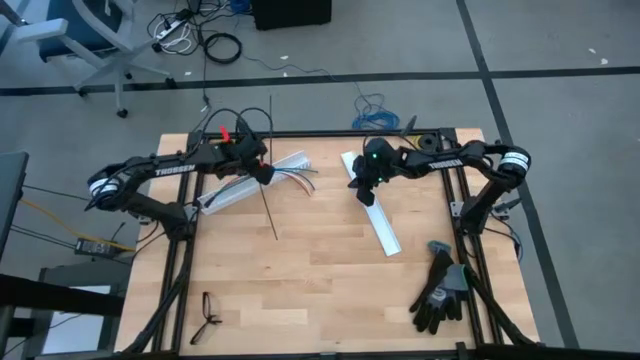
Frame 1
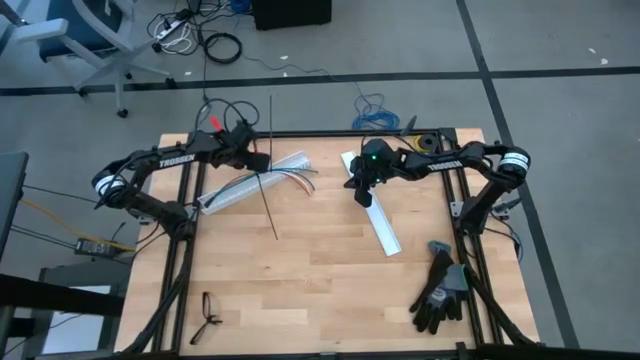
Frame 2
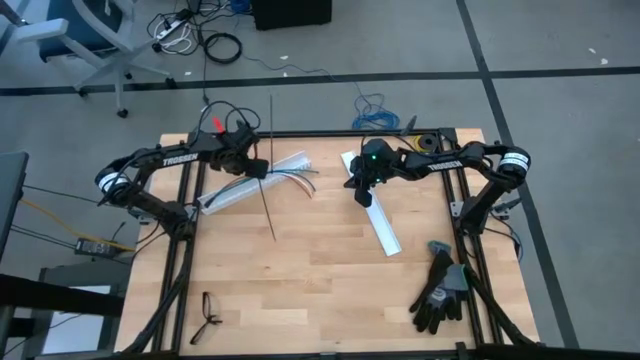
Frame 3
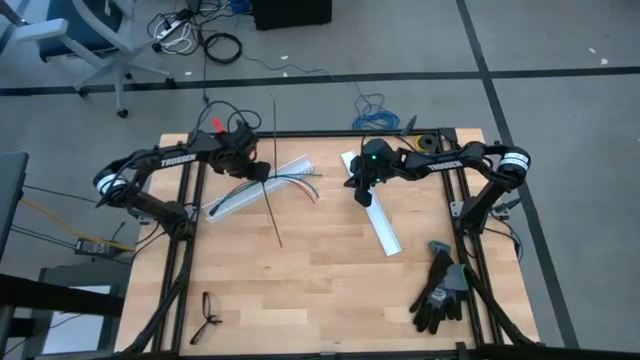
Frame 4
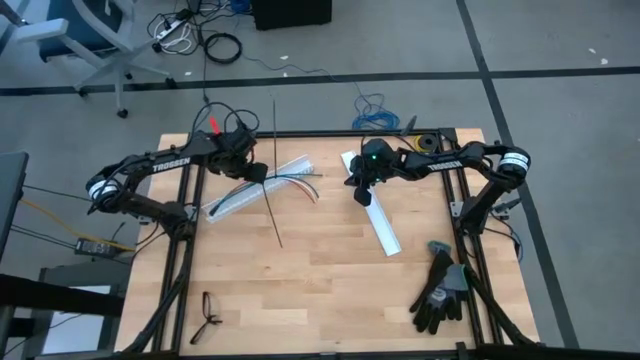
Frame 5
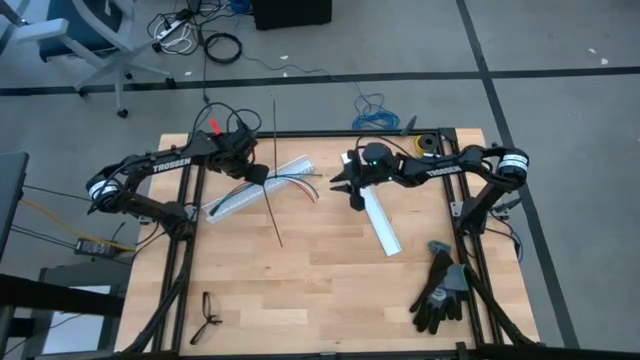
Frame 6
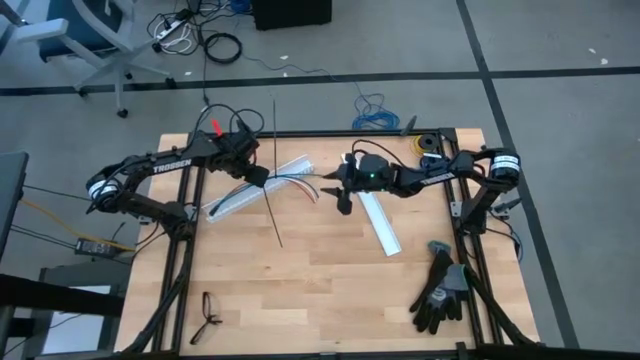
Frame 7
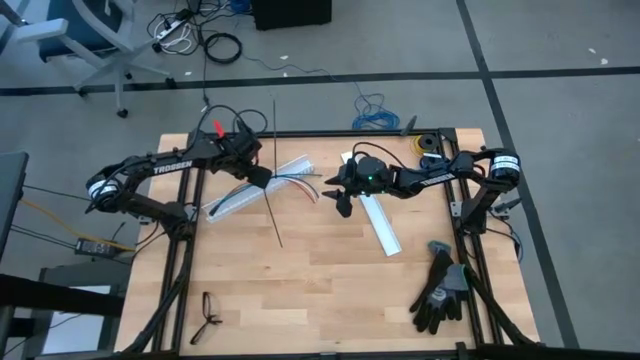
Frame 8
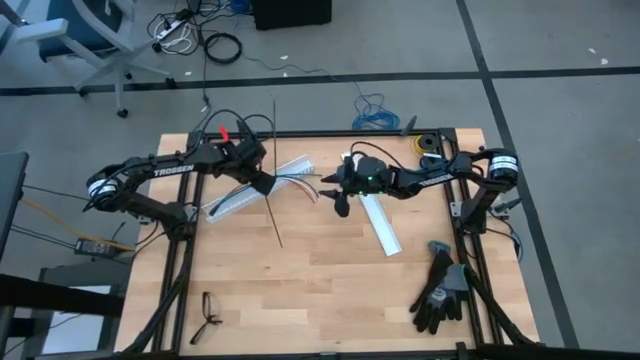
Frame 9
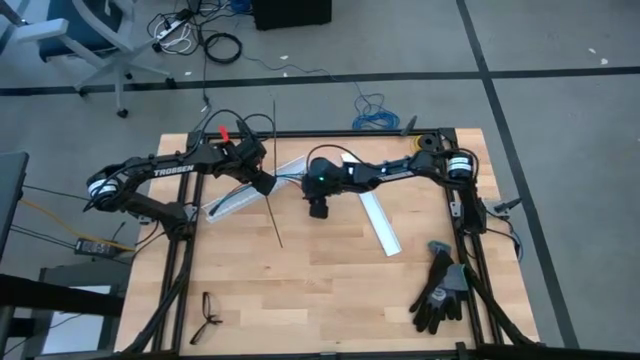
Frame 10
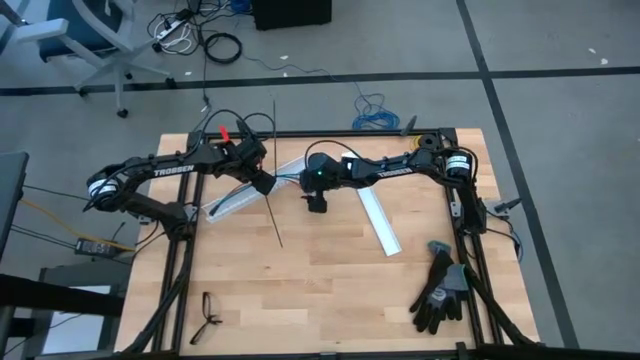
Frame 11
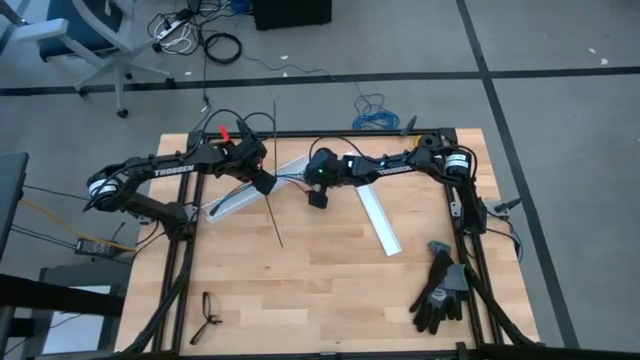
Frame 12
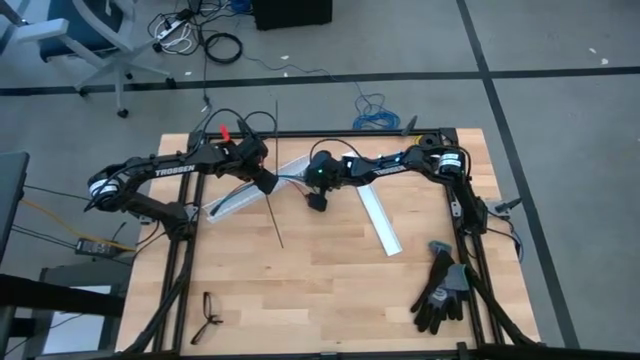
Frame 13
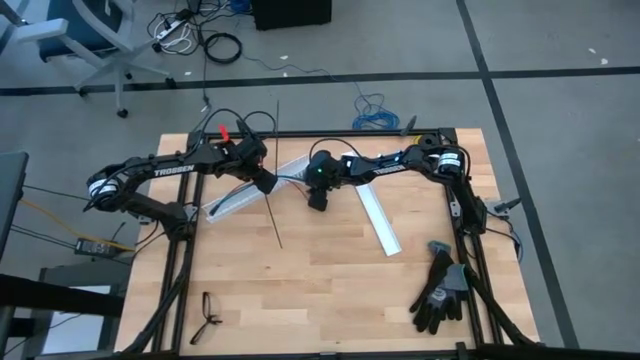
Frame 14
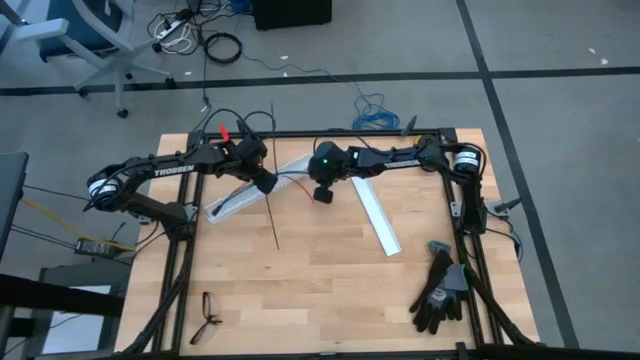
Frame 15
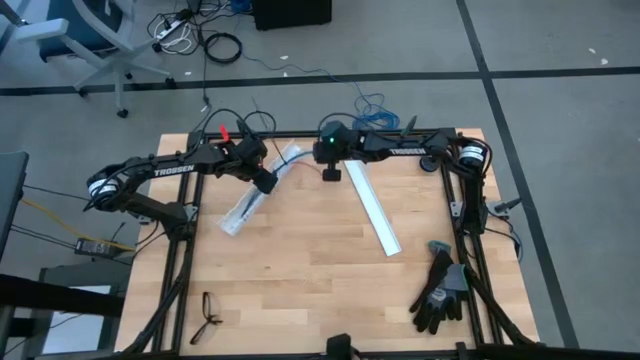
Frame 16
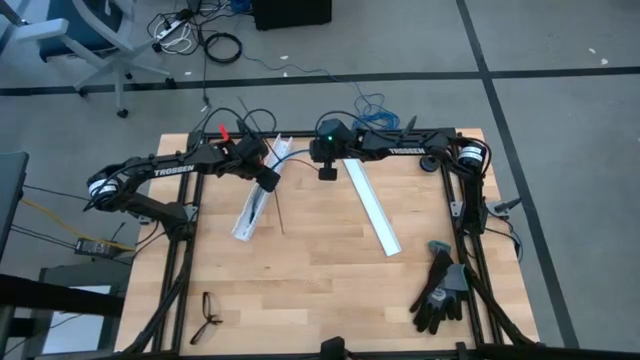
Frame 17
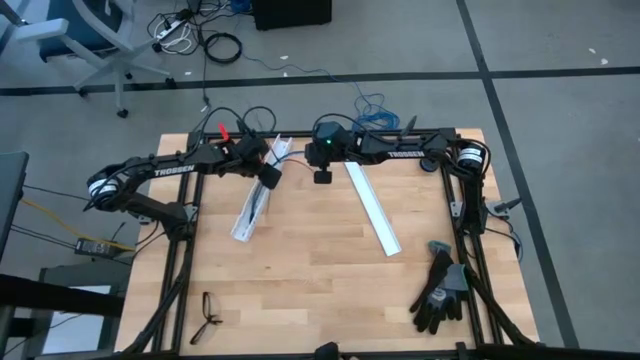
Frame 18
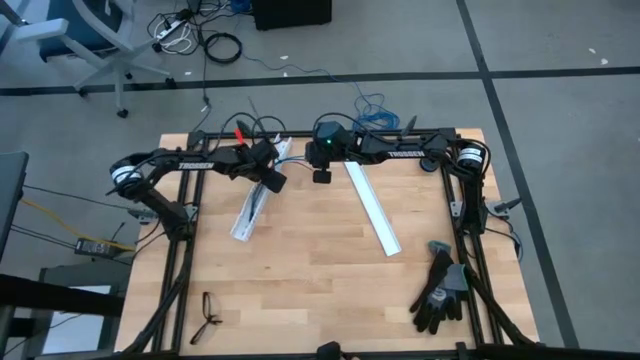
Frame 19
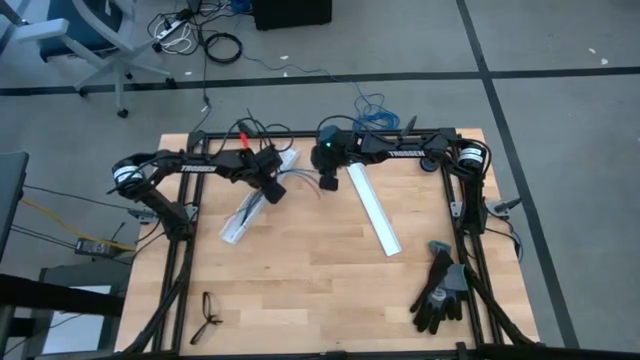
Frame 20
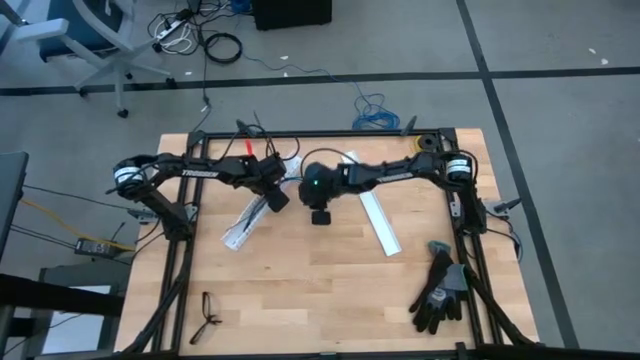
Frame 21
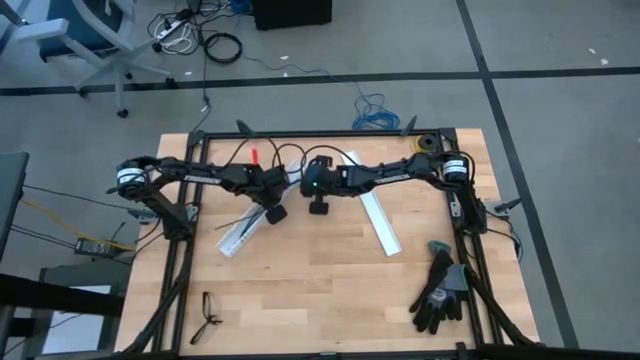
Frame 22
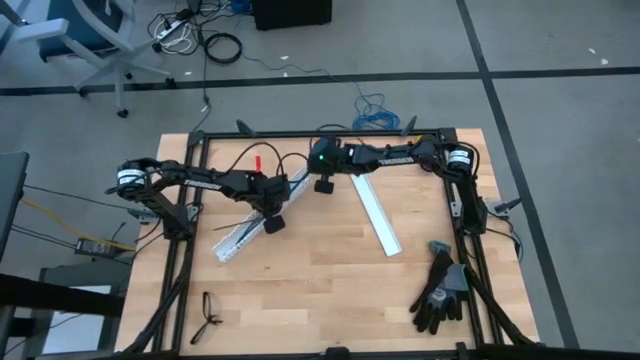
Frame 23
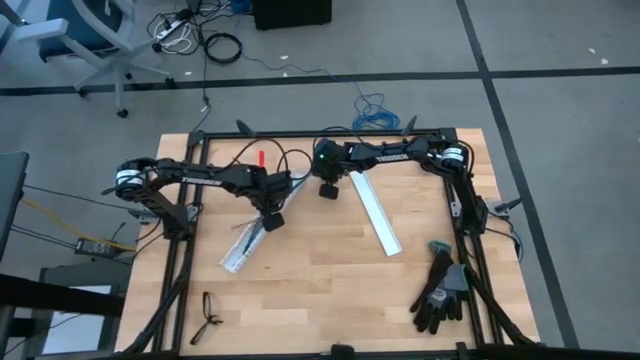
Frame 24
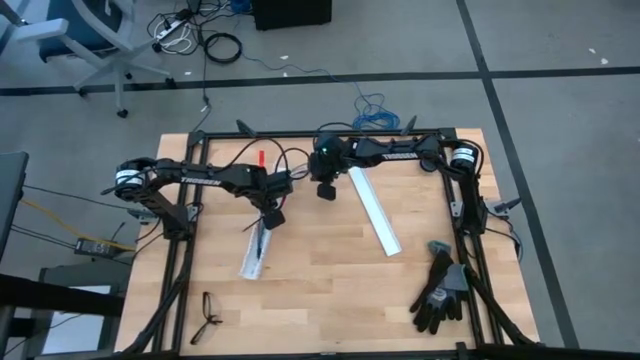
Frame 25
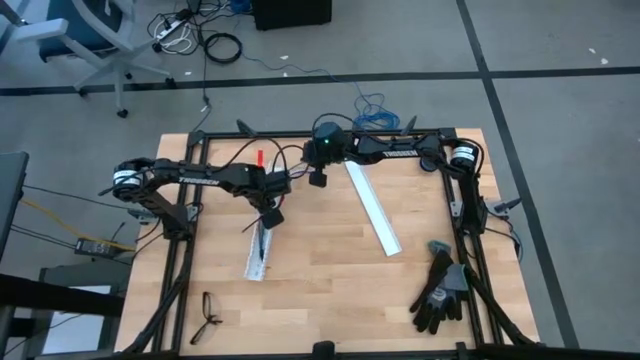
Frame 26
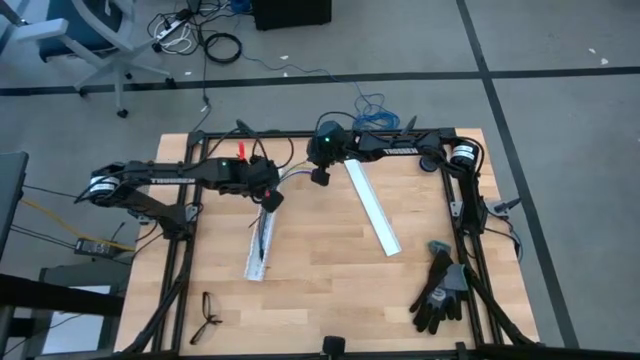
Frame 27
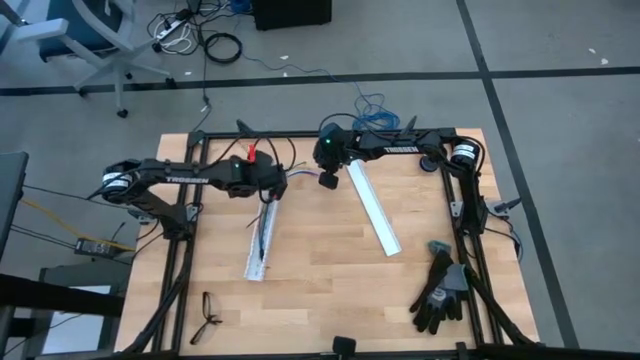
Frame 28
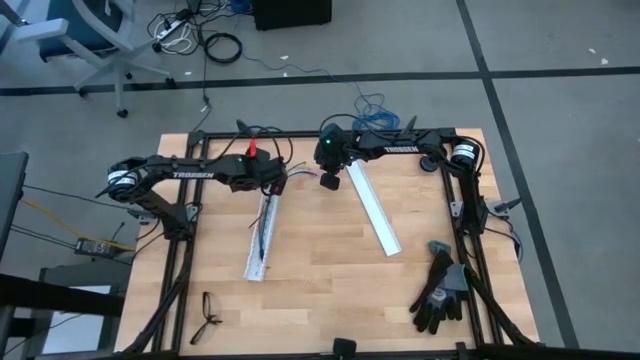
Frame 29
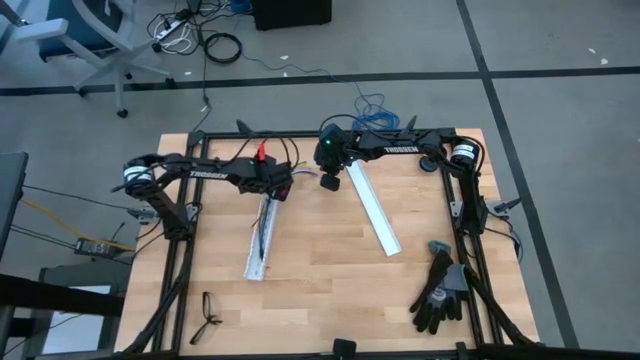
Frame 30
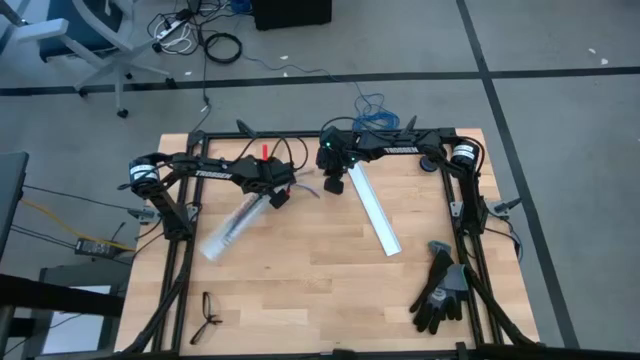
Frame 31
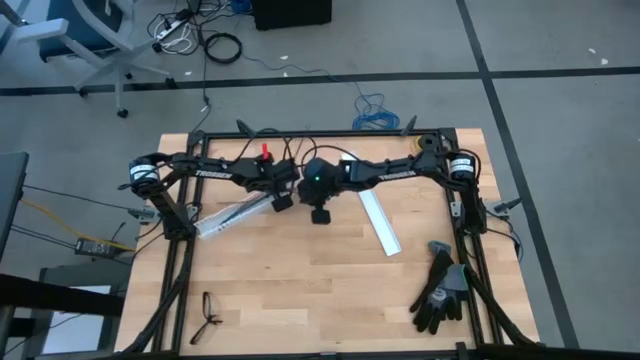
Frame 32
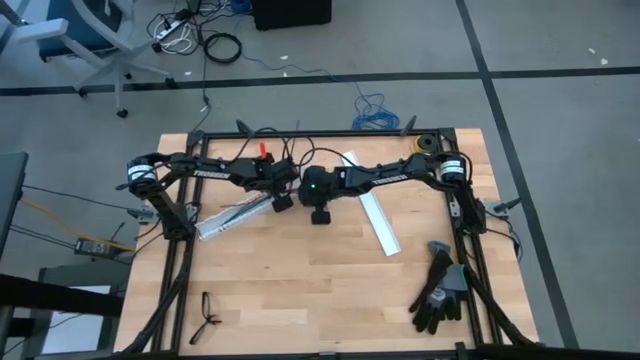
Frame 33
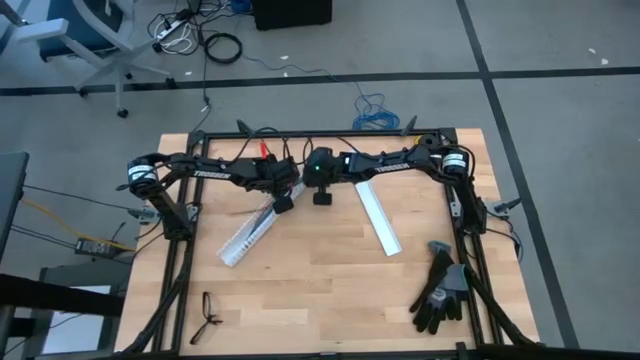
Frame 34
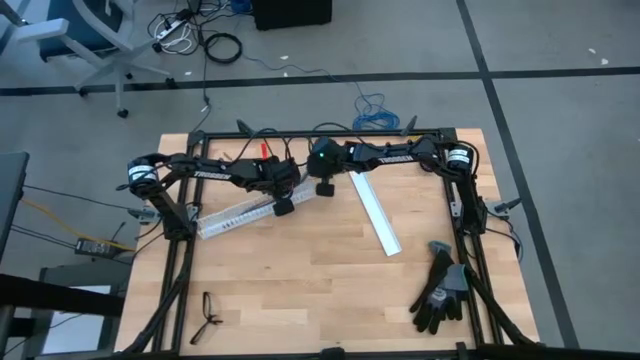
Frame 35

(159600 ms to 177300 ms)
Task: Ziptie cables
Put the ziptied cables into the white cable duct
